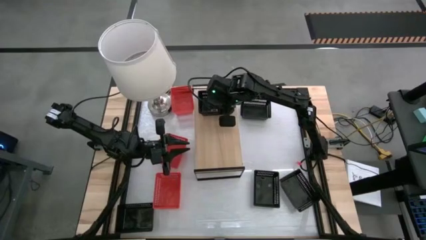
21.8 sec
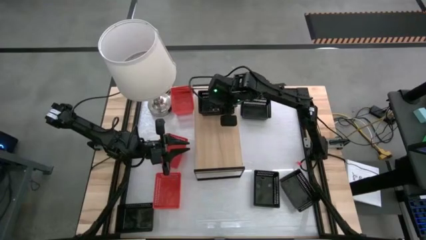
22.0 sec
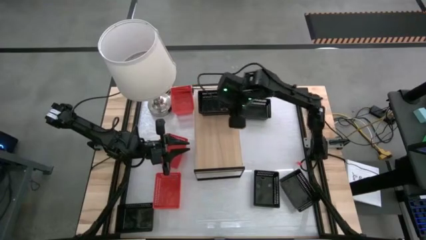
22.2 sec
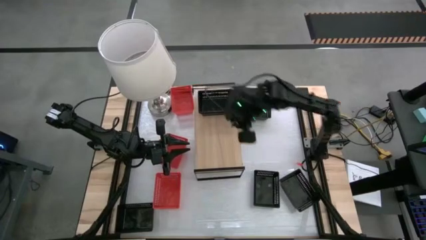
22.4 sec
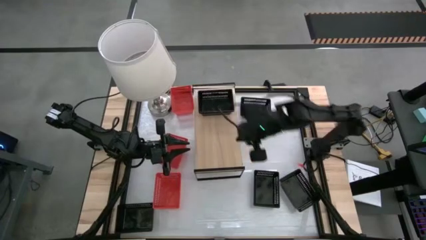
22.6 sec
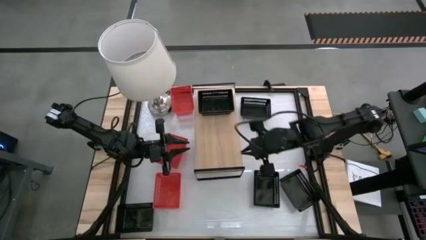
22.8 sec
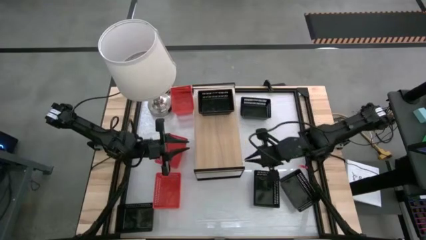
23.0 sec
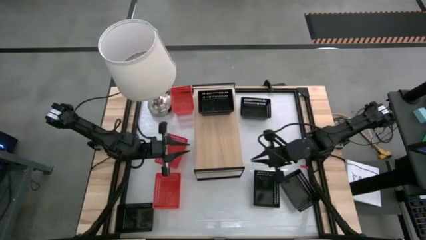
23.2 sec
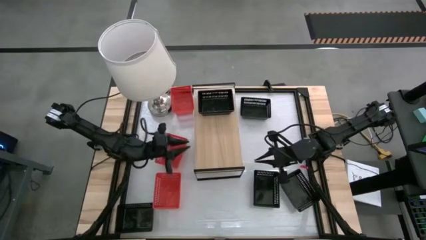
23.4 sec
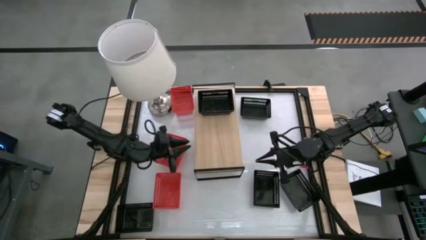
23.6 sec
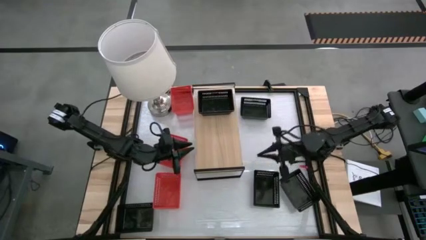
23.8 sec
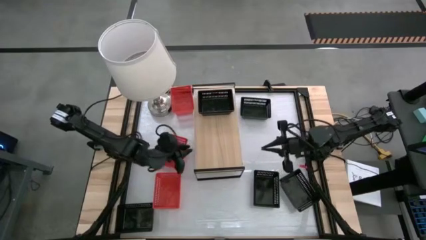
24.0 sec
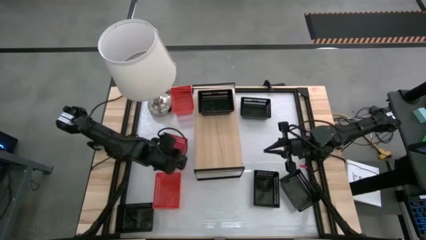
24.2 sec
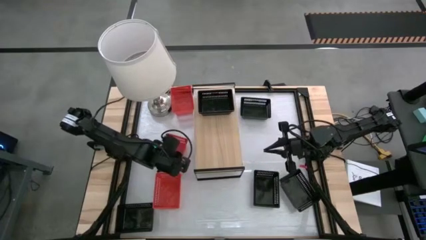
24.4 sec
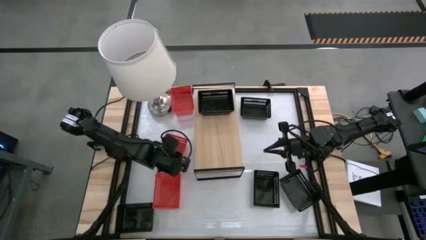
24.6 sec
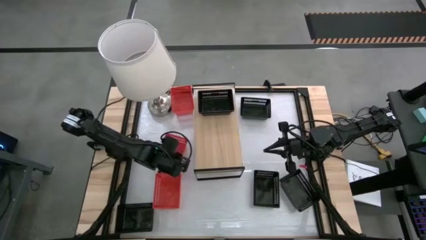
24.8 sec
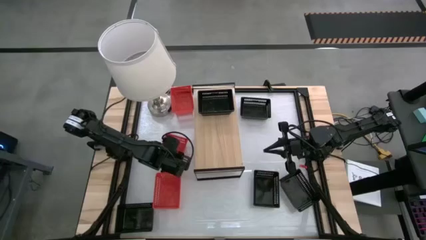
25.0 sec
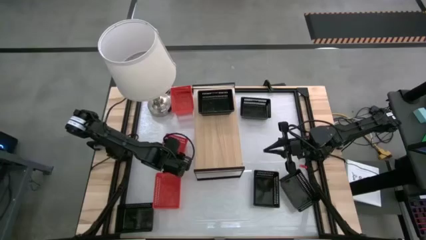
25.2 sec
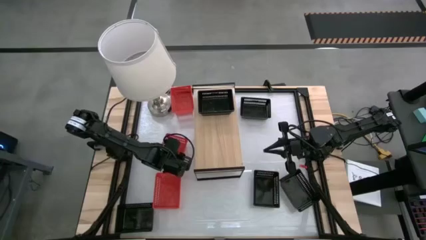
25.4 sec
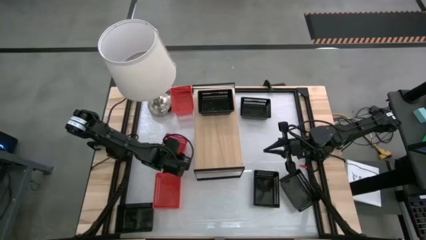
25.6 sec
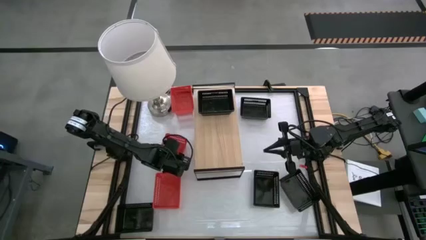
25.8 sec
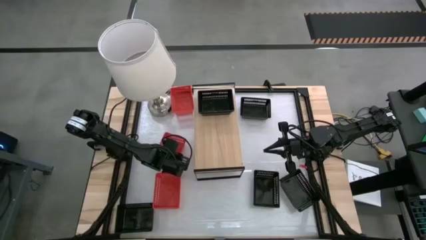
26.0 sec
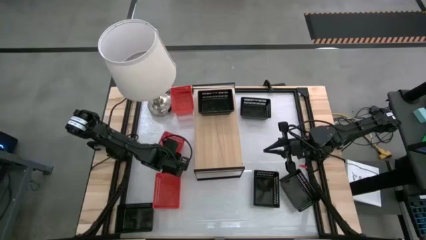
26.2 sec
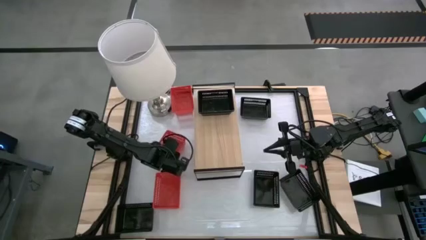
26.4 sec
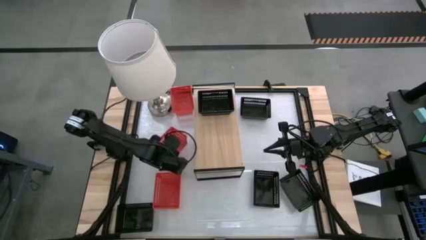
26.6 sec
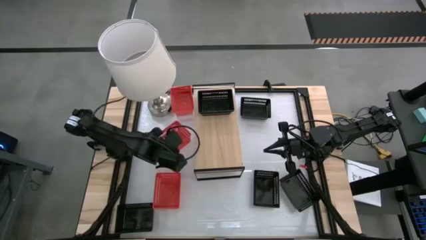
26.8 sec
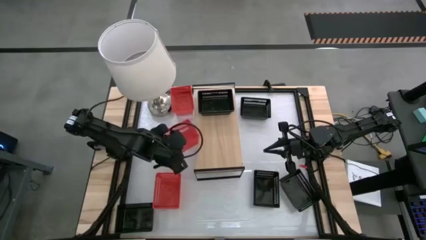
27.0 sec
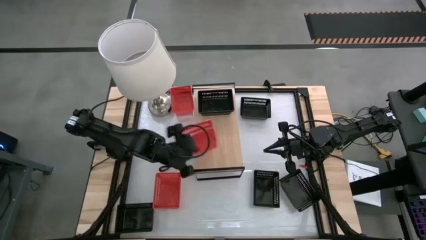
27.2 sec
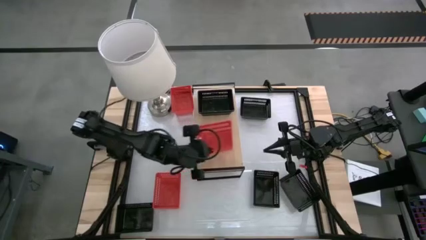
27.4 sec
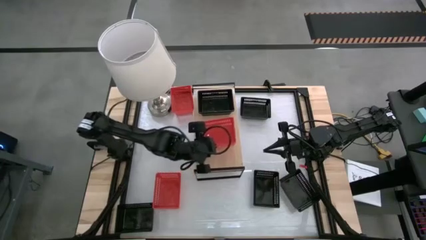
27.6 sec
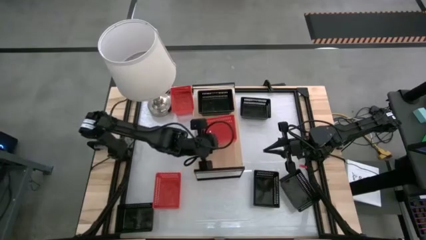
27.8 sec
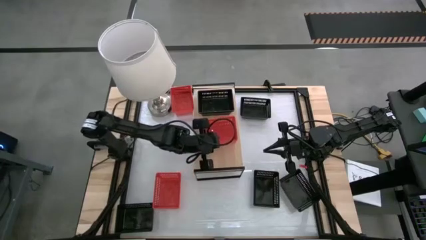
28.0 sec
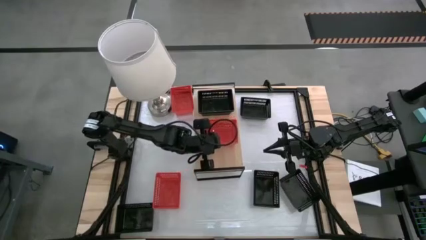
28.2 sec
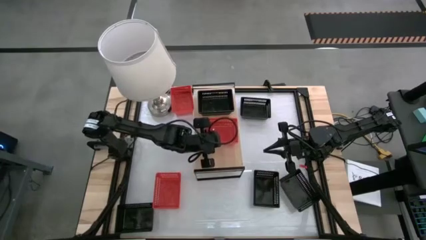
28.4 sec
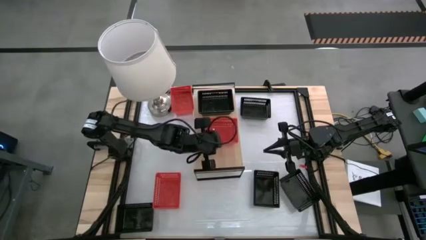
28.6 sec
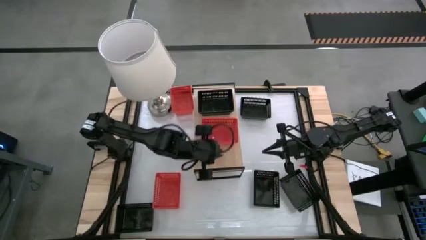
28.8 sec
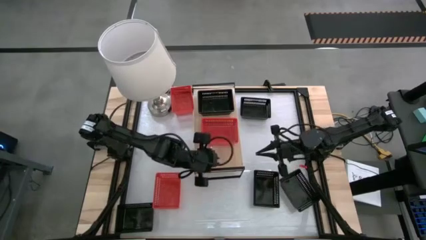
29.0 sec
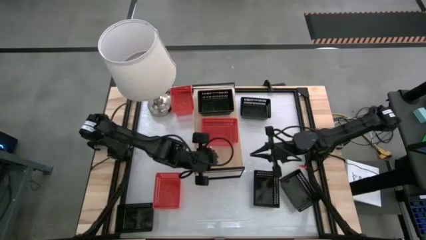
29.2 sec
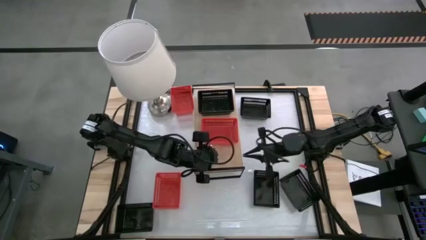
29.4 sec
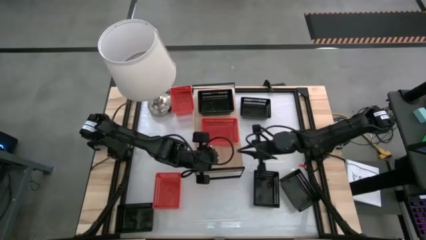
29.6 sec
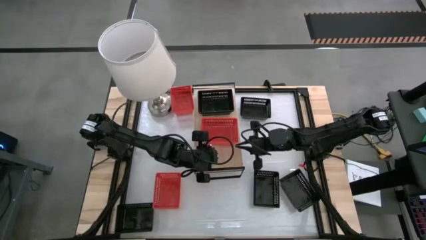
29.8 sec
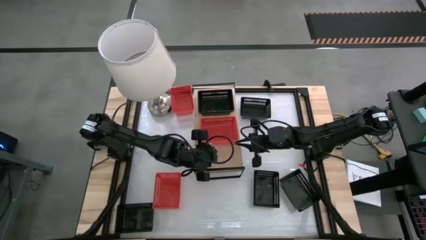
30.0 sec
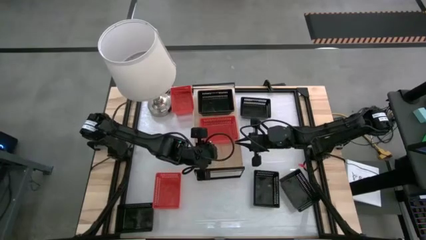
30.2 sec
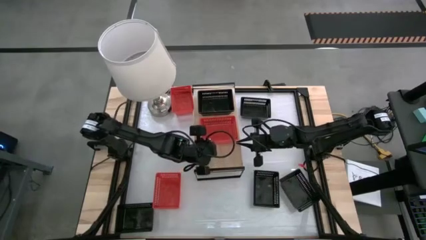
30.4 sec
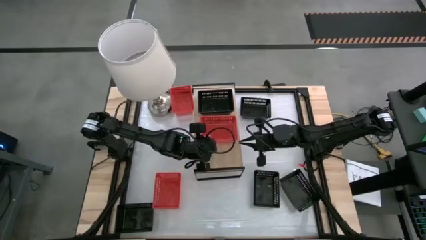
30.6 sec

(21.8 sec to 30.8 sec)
Task: Stack baskets on shelf by color
Put the red bin on the shelf

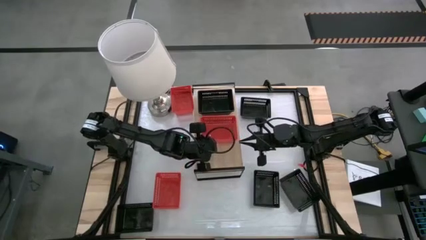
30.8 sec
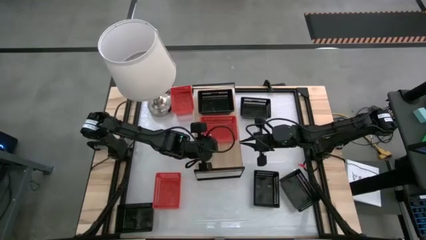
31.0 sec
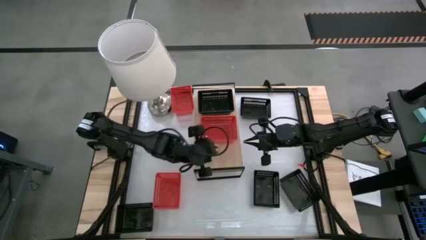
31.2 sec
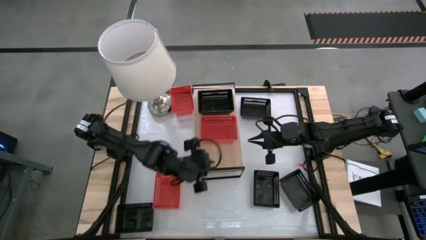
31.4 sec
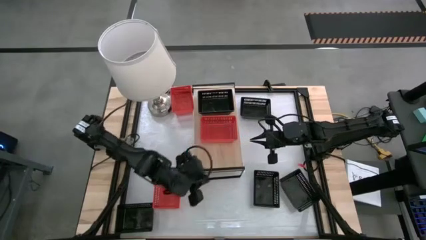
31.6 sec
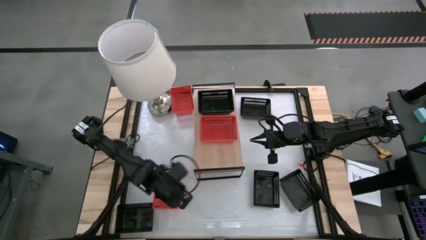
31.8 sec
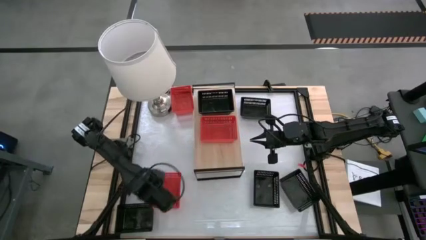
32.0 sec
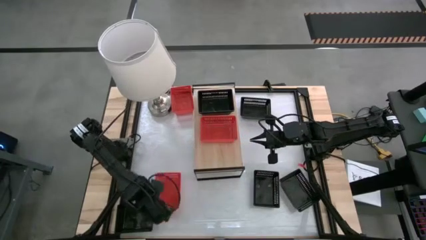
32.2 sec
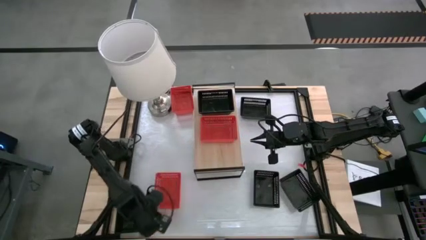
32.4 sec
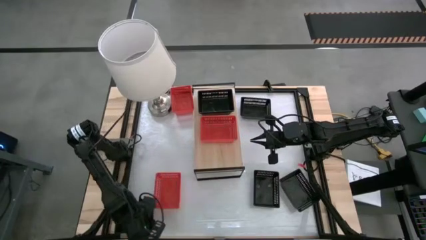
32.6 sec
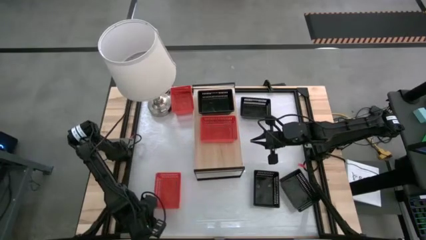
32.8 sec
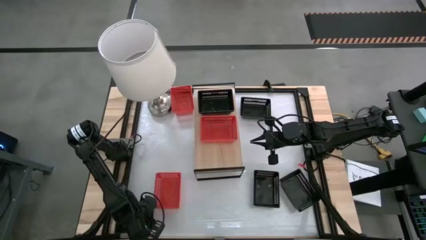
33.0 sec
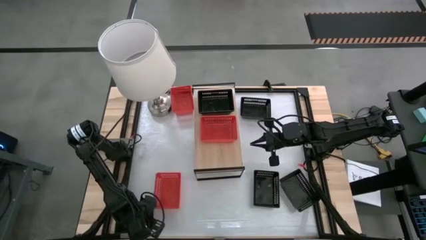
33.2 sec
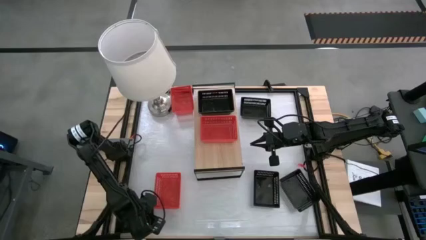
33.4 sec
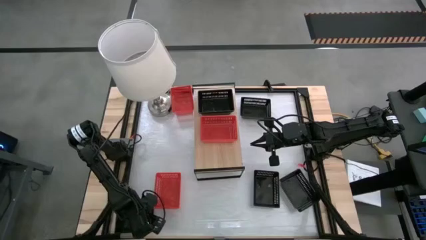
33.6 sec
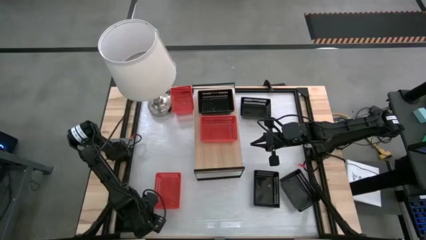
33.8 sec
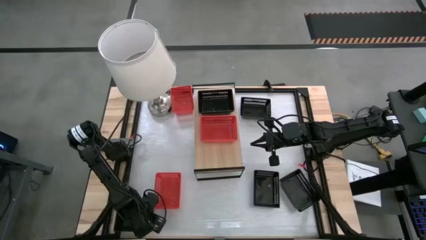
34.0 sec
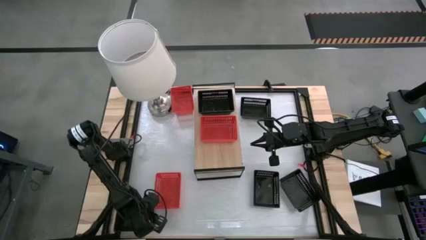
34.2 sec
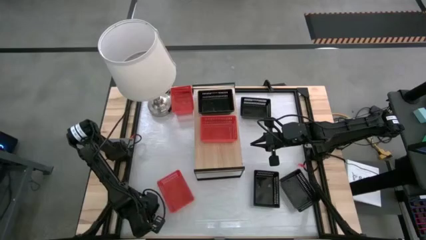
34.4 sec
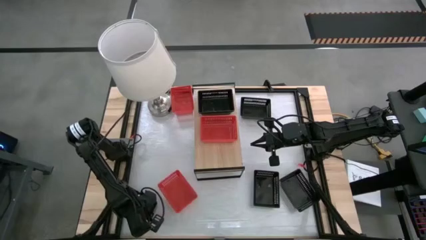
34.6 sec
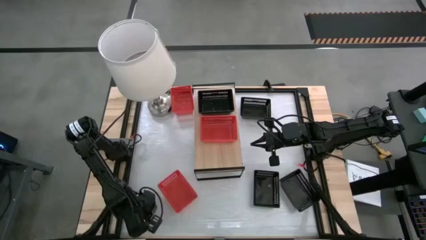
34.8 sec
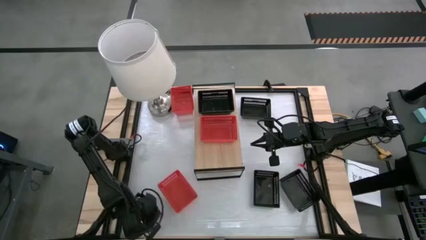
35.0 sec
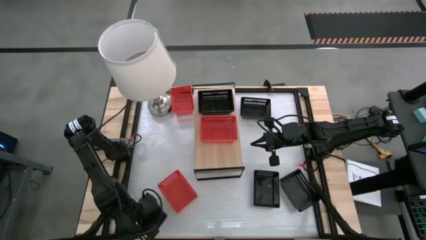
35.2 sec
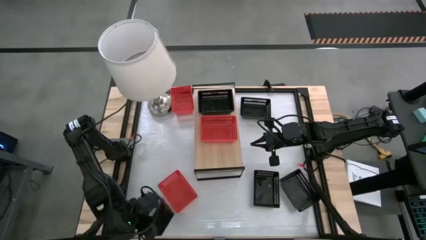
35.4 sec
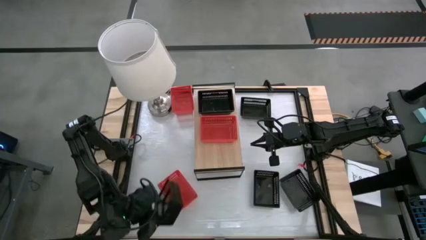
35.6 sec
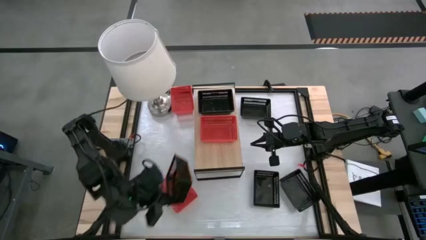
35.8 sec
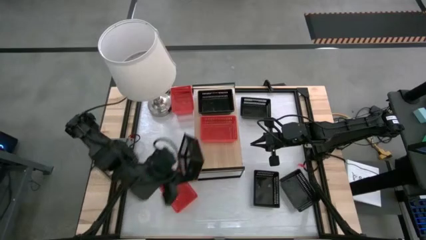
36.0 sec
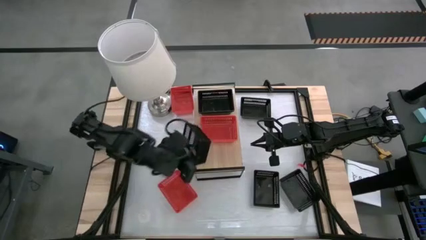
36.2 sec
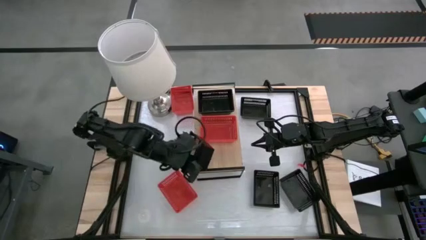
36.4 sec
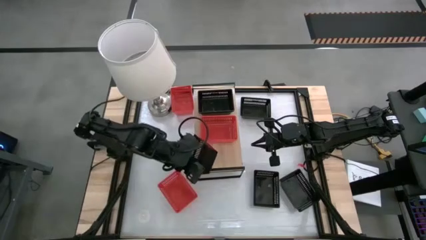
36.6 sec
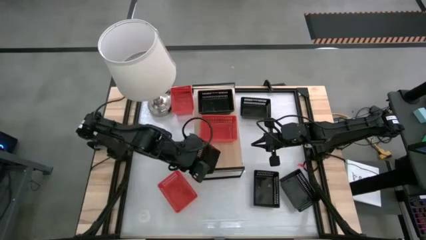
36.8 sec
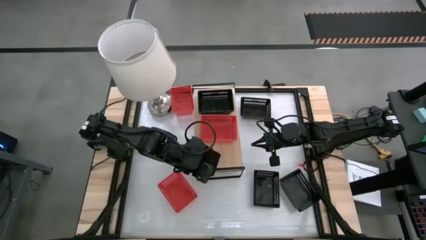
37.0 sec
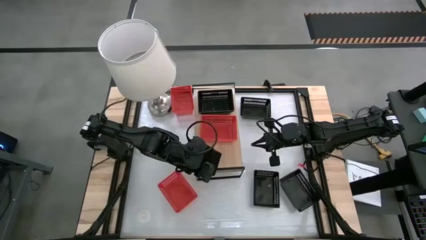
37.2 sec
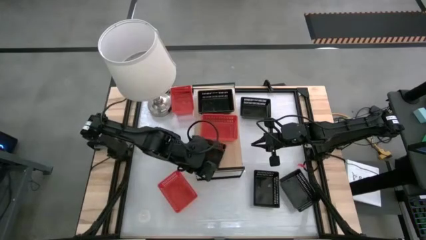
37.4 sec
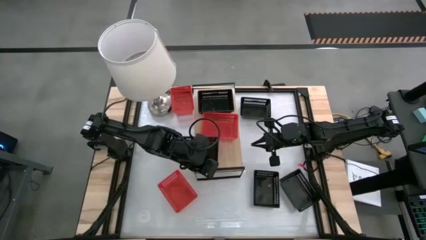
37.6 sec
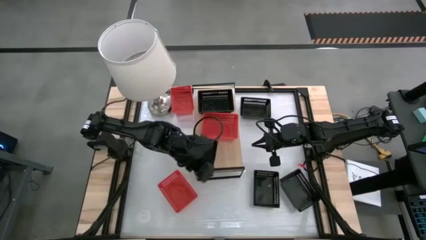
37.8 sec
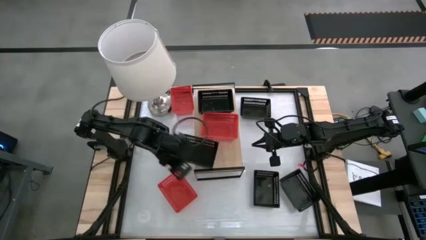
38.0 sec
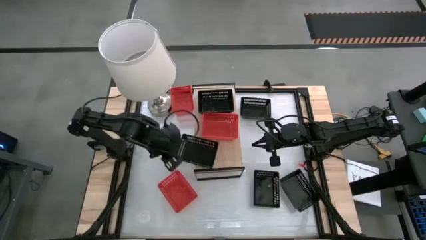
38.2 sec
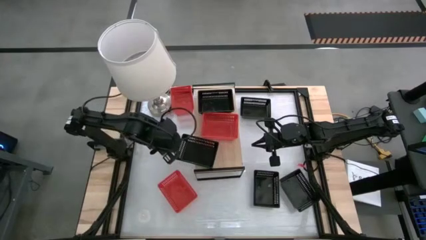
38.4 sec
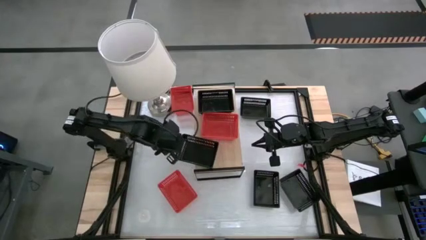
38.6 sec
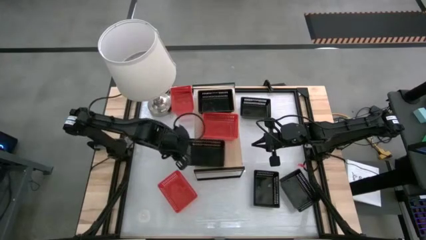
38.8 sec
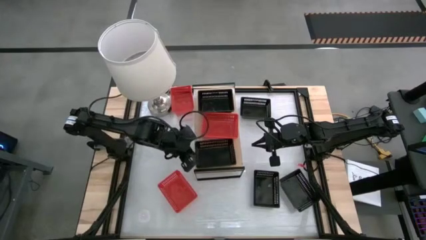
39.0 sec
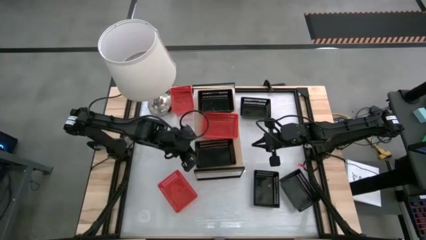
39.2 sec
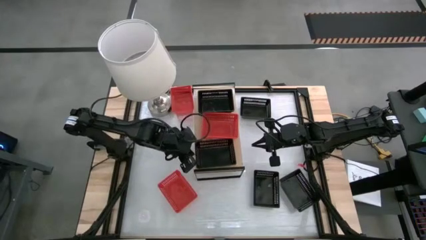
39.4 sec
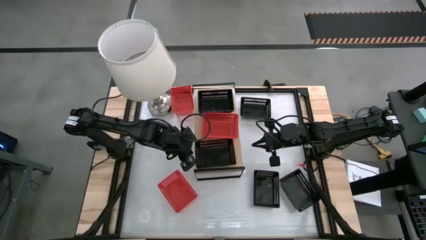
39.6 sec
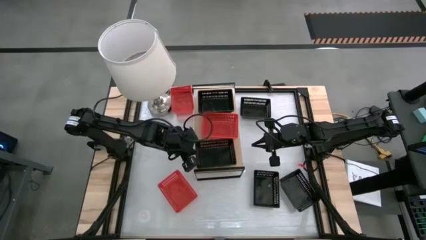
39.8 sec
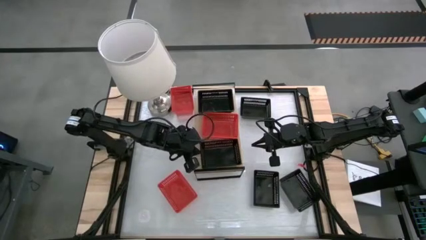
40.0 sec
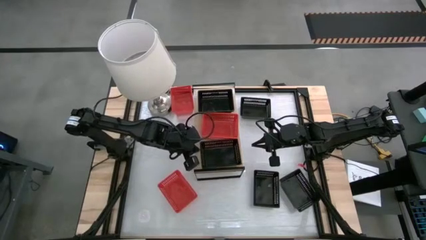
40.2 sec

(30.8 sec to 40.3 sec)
Put the black bin on the shelf
